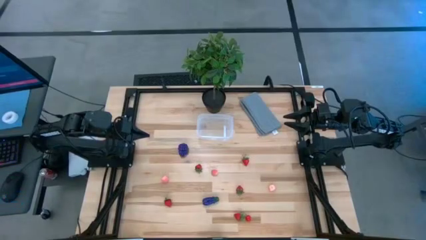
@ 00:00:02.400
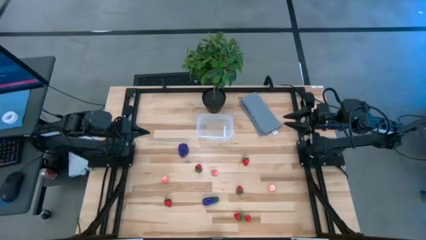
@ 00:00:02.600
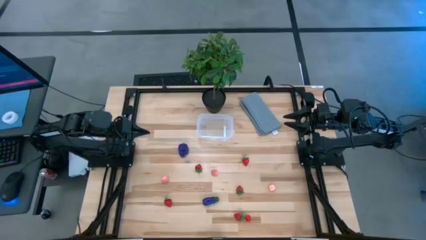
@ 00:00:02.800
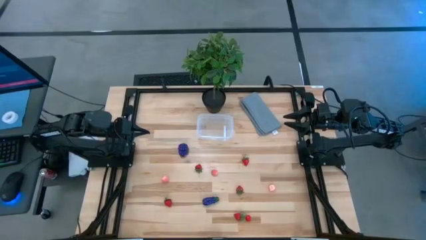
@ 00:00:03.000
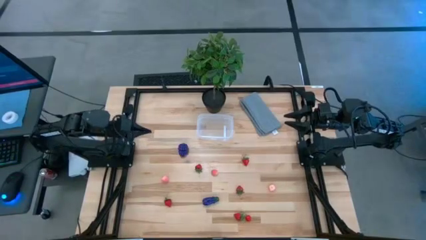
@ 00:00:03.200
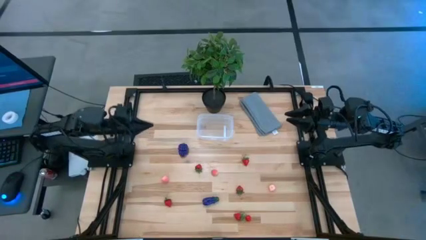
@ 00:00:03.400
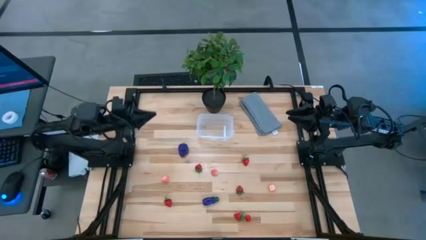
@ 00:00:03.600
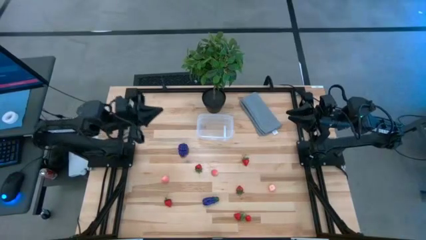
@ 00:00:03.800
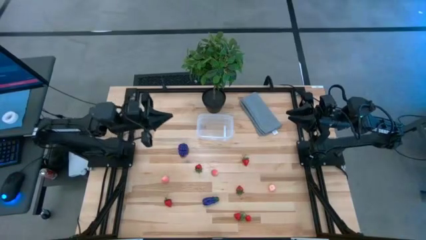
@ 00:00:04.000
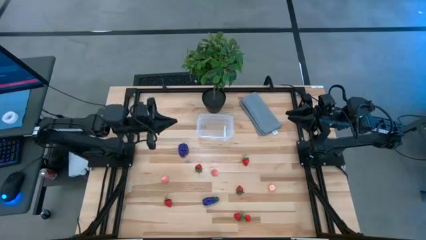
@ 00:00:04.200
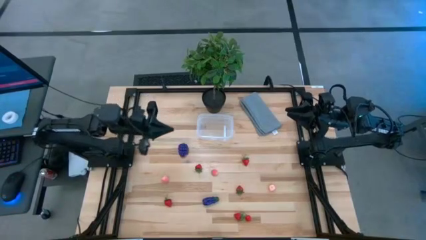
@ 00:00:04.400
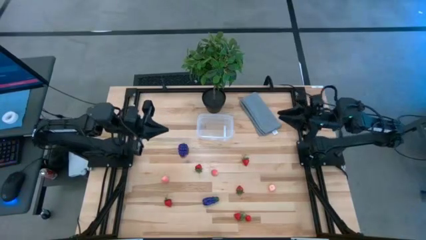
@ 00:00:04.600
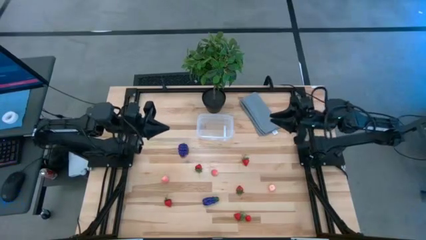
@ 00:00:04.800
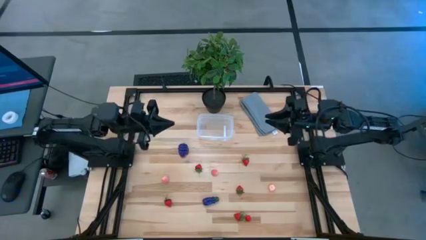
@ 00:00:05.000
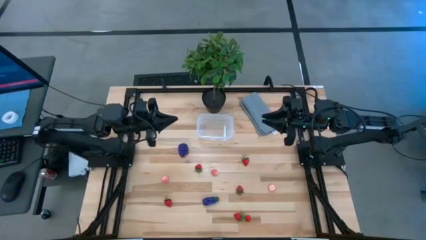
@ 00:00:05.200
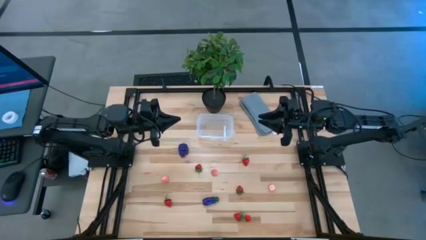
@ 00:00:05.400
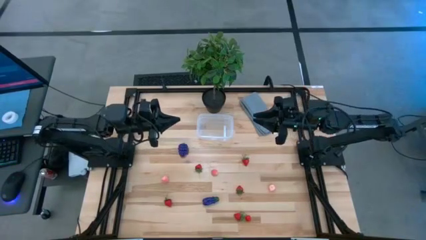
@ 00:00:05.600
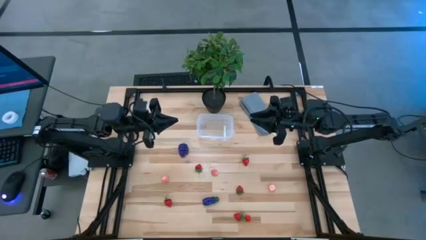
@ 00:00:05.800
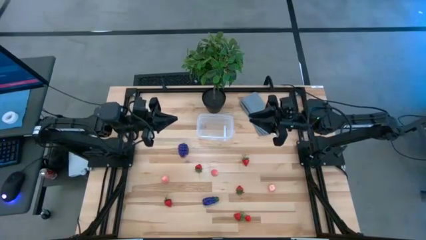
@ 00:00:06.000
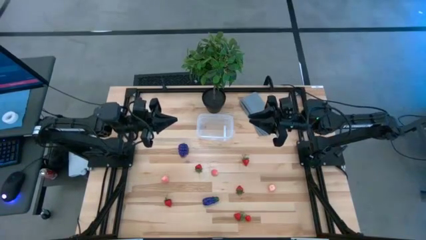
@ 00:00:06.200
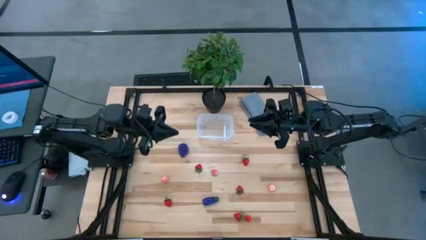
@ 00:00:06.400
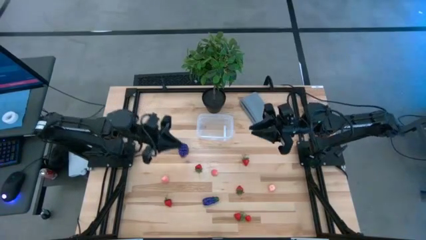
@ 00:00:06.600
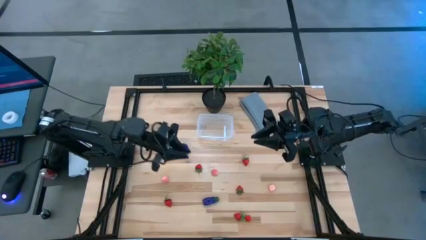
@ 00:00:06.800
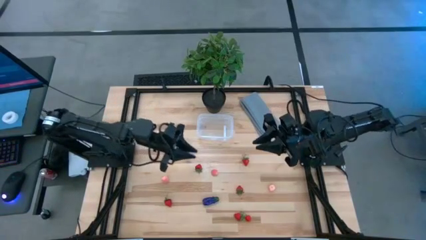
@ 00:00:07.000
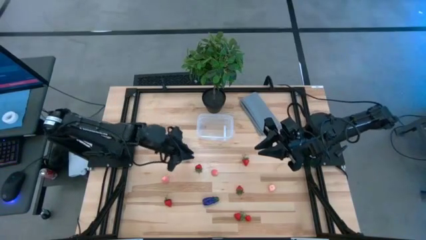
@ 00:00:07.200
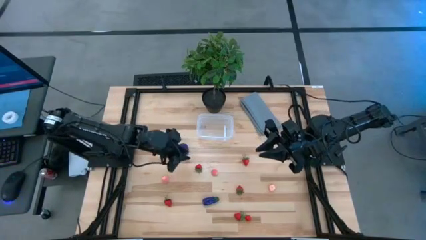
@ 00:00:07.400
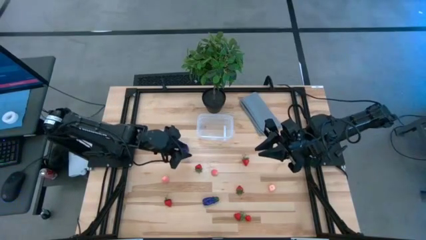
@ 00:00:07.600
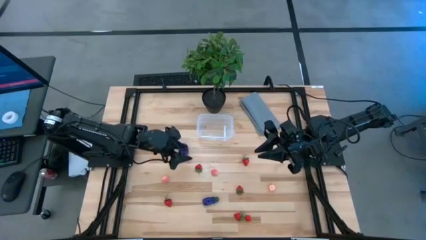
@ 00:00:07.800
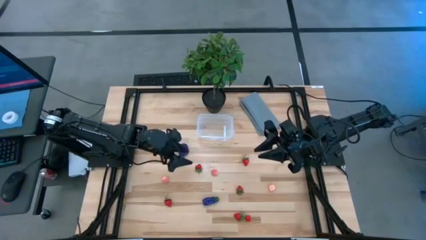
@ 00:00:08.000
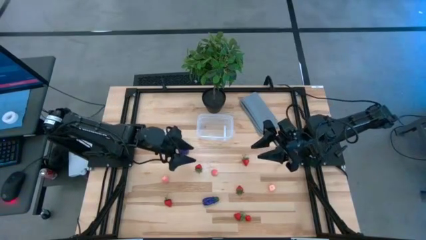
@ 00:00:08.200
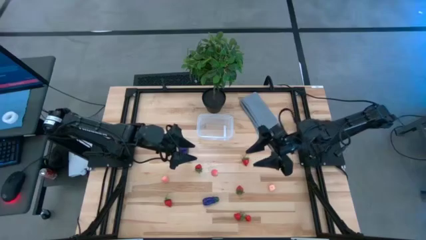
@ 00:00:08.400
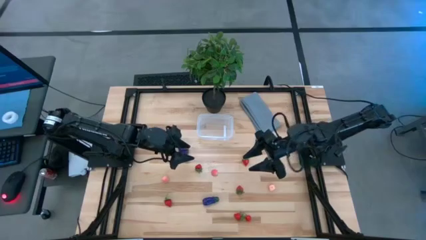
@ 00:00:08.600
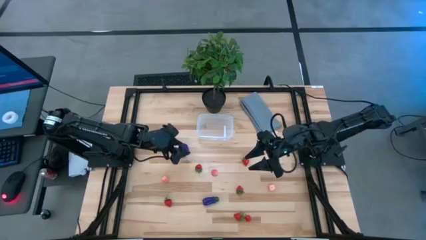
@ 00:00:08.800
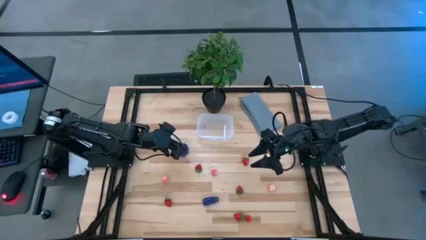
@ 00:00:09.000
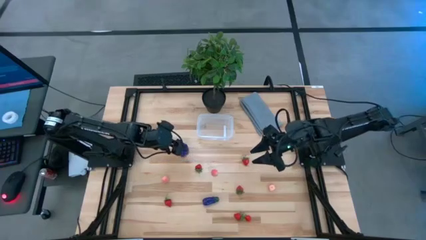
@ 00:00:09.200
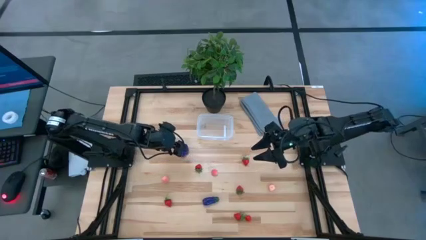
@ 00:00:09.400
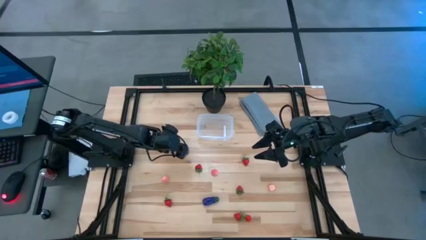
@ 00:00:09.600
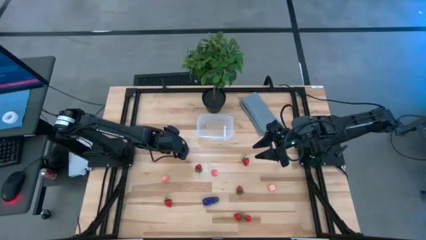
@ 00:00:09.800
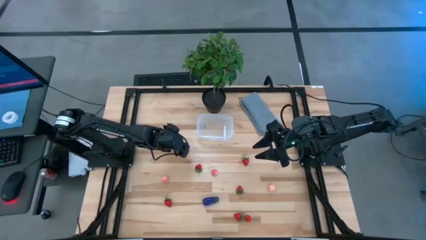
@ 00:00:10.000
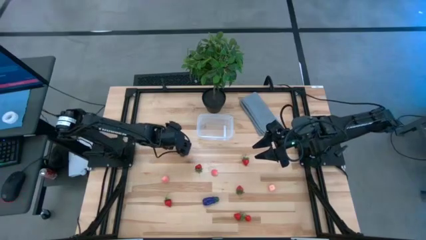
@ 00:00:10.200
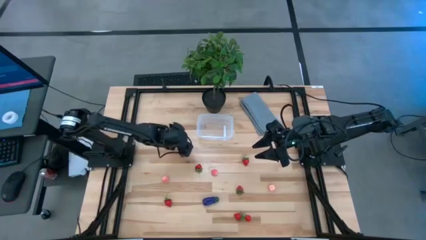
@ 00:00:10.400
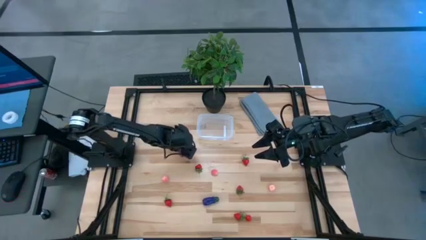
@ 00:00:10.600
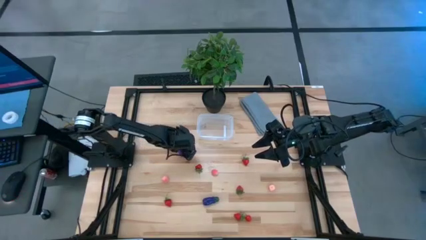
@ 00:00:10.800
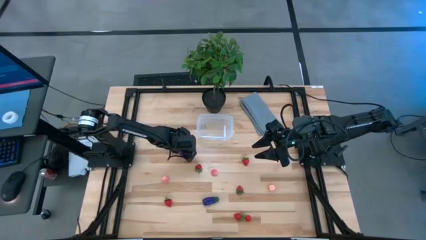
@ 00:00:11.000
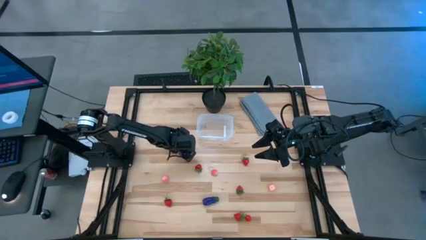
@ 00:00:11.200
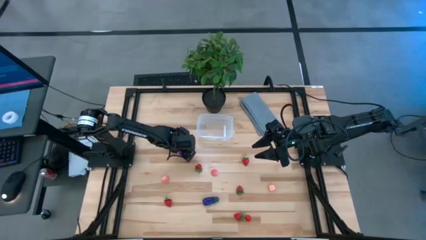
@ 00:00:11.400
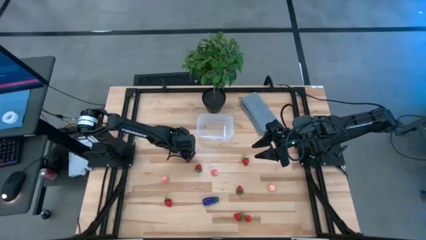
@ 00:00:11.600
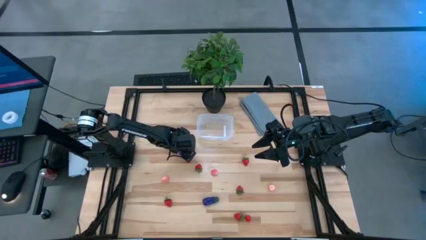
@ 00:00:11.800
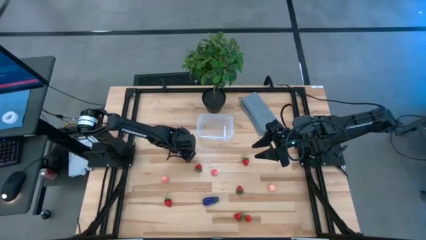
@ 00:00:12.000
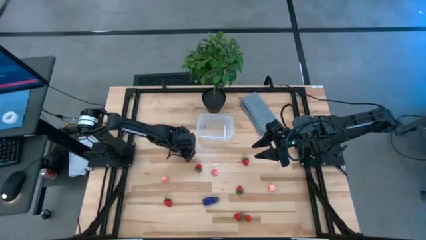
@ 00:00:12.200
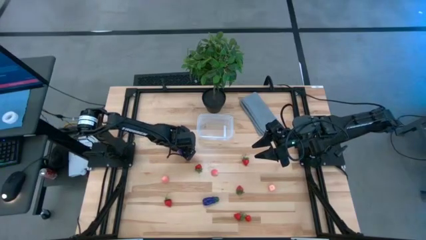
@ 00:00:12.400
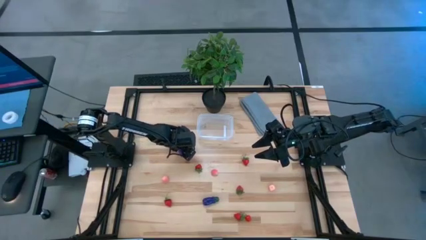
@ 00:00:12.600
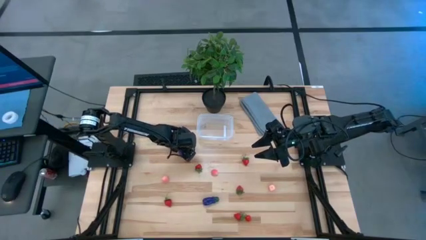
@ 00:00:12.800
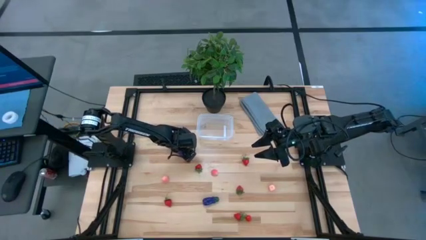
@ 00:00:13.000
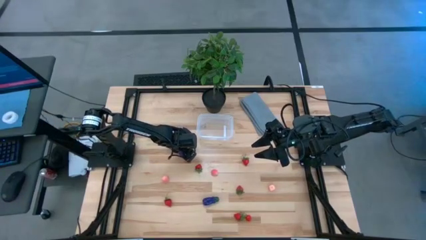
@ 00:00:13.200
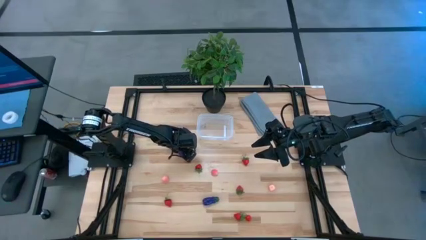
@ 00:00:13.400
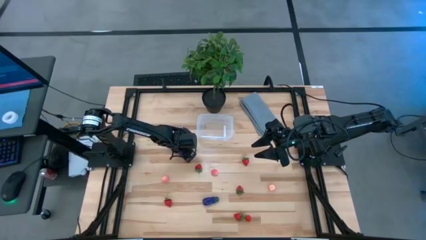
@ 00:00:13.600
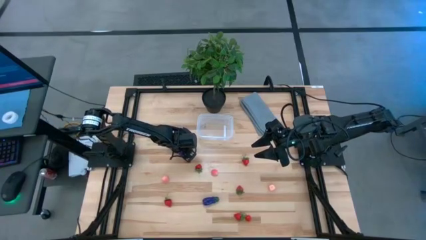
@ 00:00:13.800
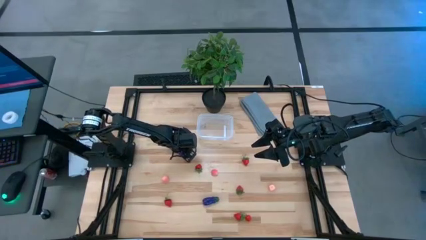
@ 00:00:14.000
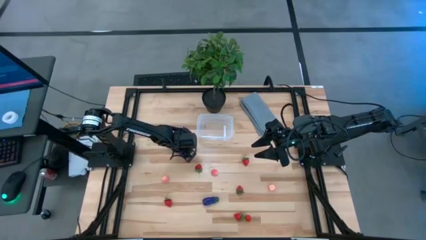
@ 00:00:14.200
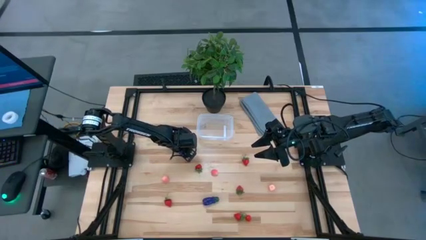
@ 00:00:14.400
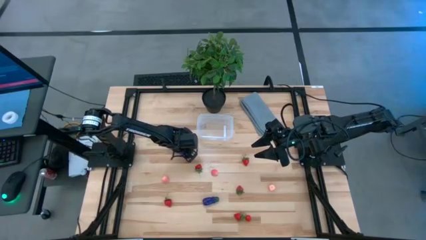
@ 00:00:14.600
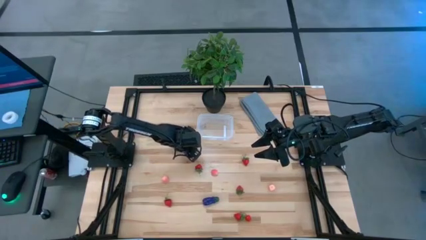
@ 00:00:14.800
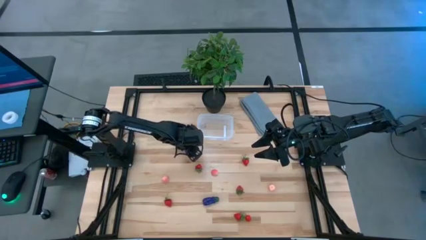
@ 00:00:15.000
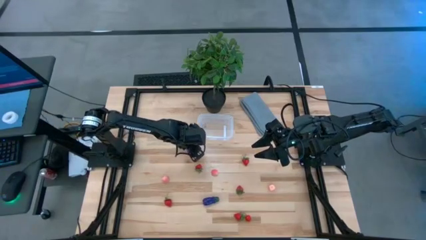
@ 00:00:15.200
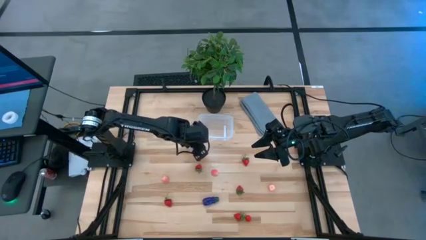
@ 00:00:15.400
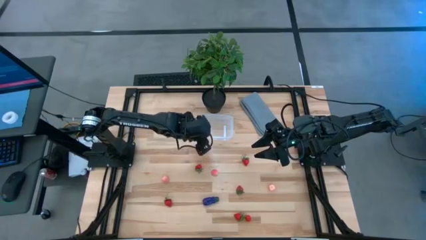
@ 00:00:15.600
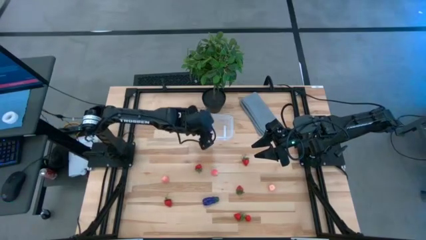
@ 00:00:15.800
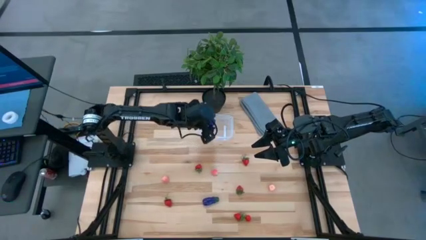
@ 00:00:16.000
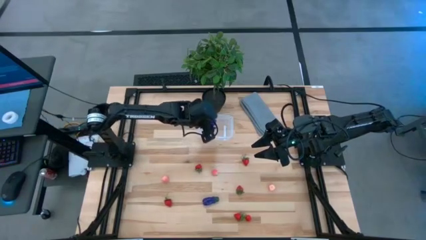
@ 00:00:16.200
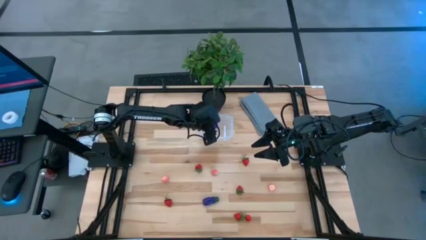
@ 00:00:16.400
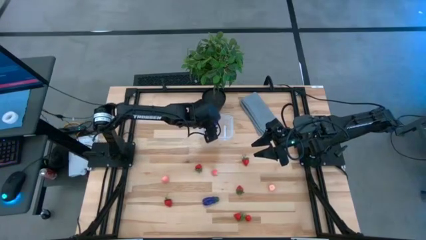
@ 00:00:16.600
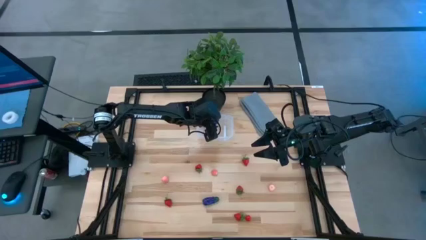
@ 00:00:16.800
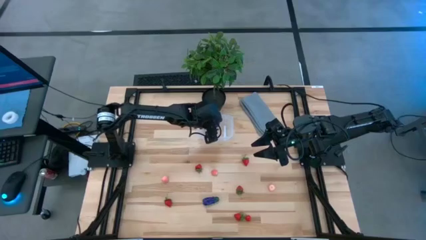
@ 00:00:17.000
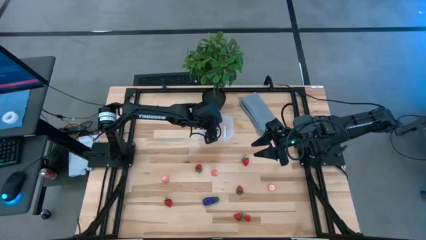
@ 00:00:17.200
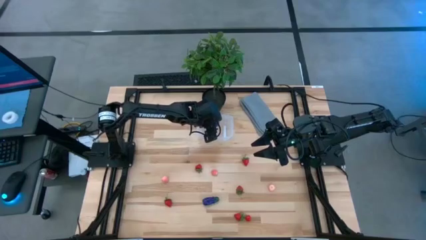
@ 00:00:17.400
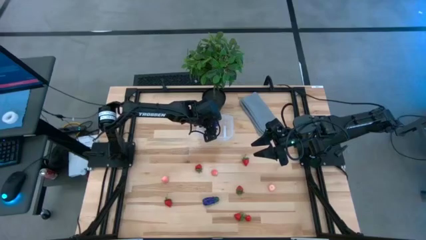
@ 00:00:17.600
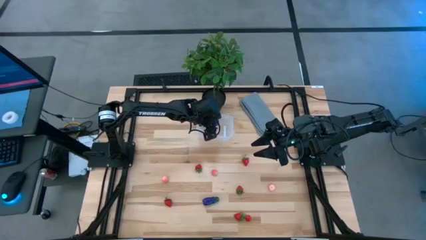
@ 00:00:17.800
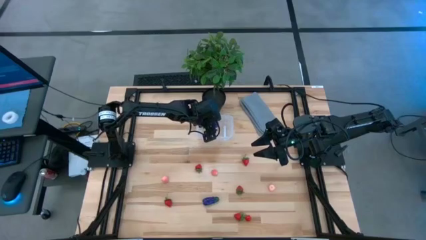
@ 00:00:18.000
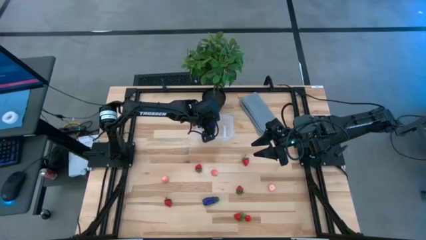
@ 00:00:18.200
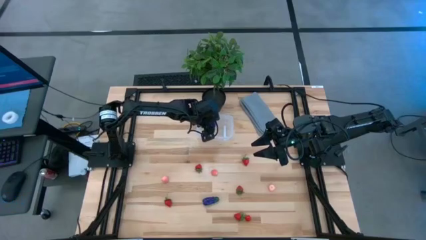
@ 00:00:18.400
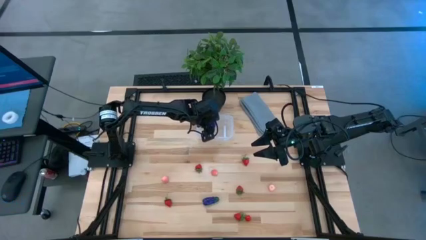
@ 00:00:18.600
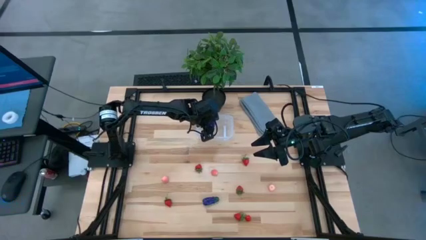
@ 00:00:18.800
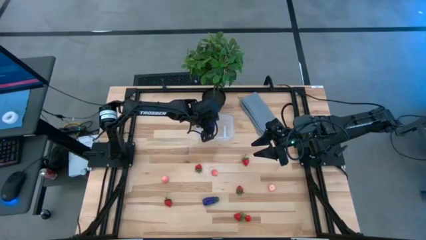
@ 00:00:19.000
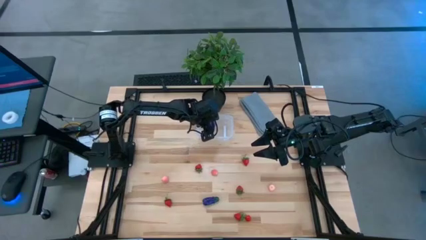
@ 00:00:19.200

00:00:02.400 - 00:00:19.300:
Task: Pick and placing Produce into tupperware
Put the blackberry into the transparent bin
